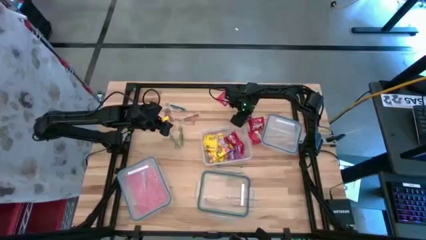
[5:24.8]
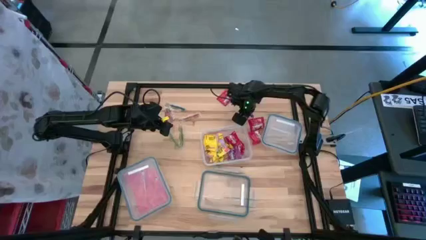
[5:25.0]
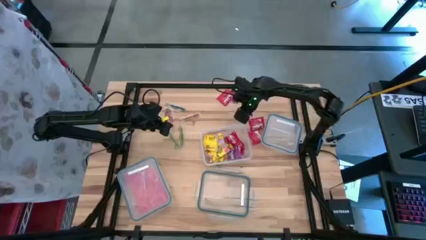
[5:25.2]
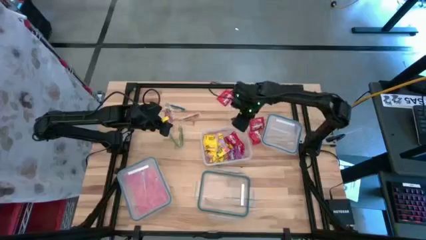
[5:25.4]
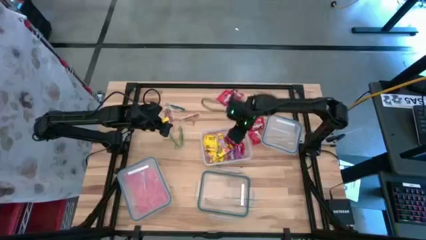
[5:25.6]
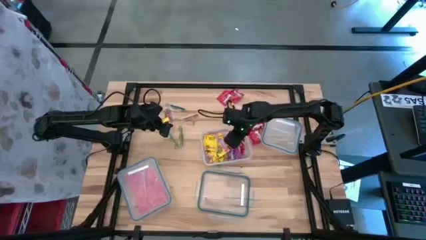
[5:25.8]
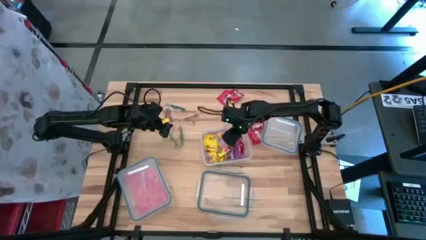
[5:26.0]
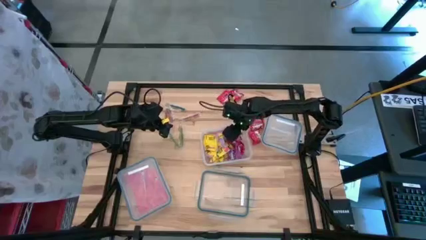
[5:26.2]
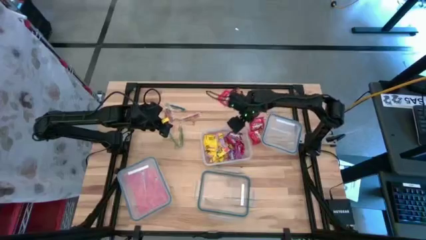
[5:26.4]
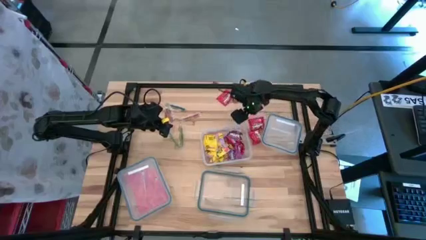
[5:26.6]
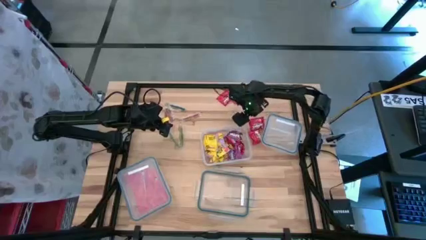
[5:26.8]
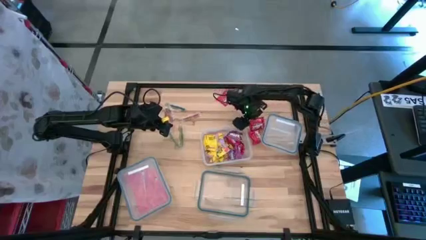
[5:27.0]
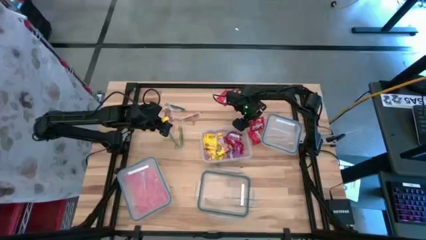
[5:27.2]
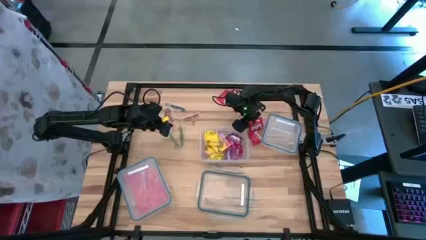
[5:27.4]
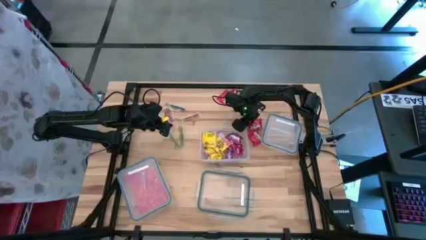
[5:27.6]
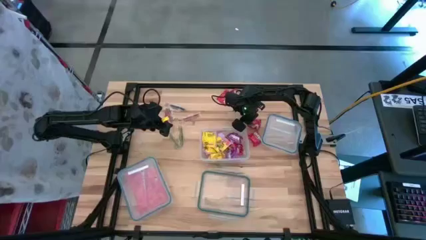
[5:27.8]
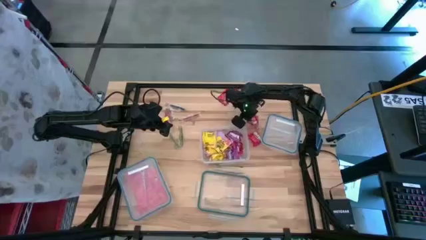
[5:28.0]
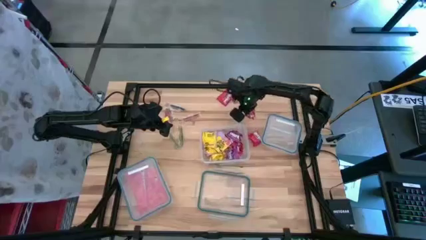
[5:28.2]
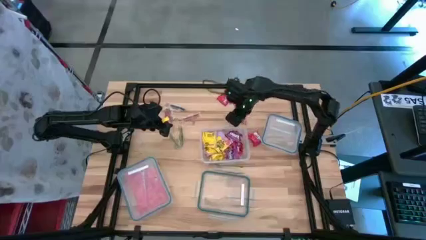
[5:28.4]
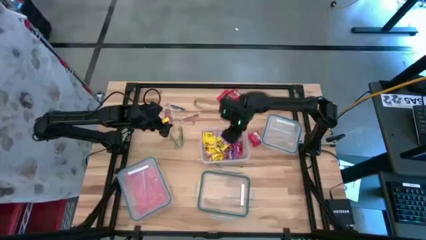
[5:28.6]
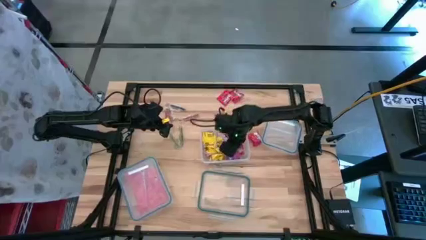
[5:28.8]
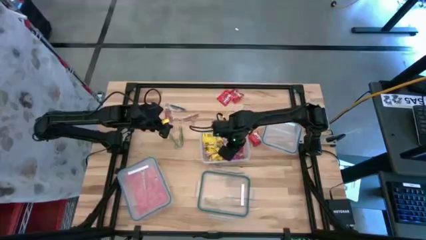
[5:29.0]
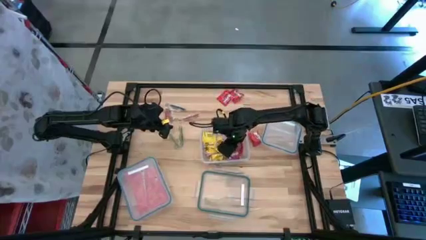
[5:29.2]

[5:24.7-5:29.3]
Task: Sort candy
Put the purple candy into the rectangular transparent bin

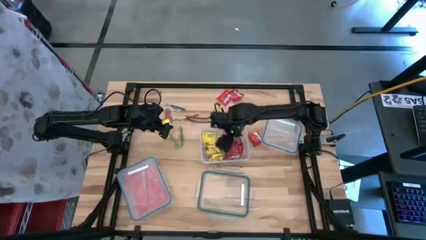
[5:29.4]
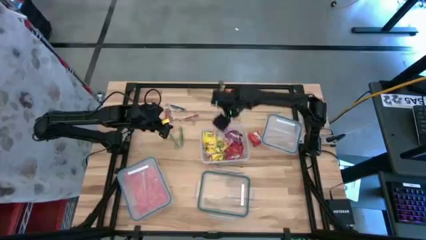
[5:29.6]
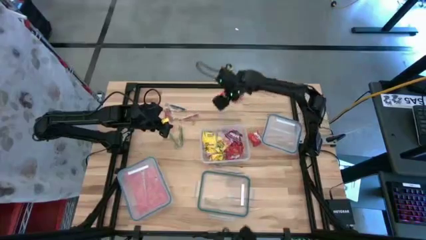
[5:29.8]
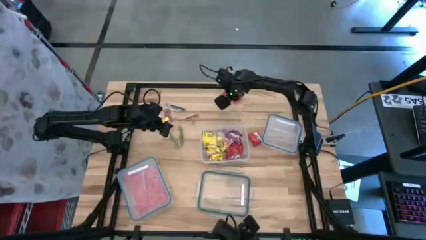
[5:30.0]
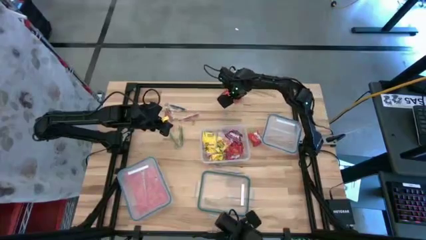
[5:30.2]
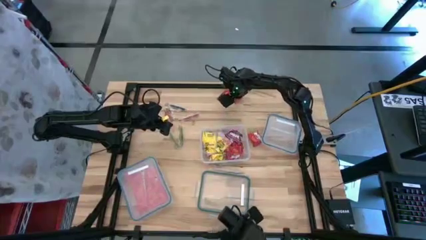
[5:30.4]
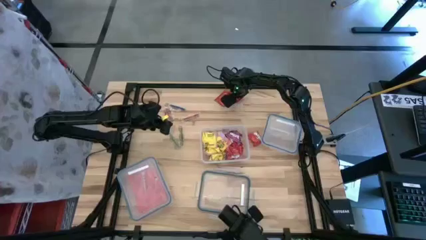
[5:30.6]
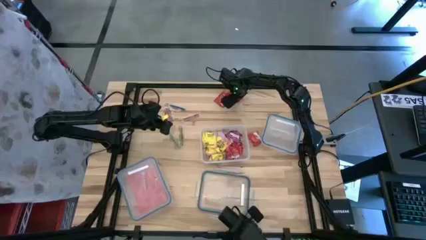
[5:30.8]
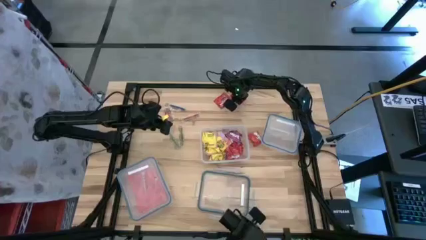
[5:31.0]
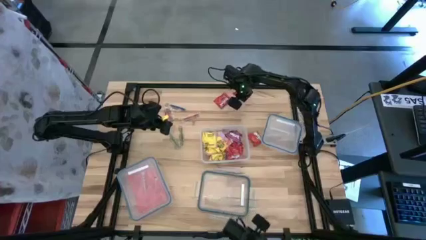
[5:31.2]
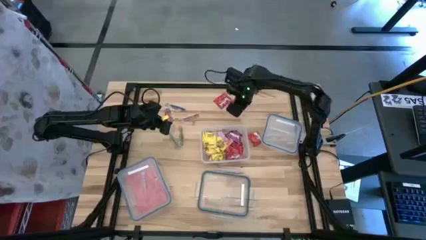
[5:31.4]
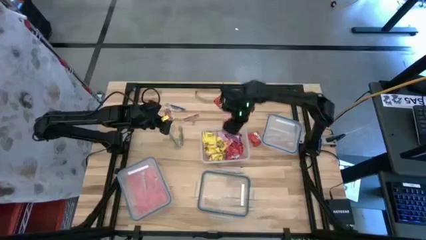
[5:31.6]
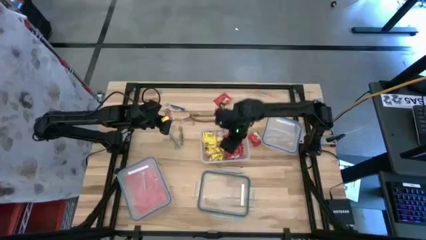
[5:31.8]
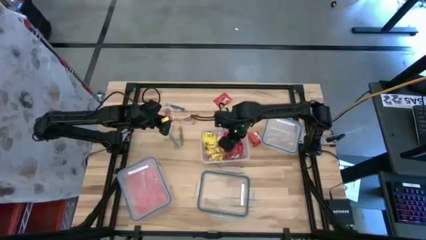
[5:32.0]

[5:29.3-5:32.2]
Put the purple candy into the rectangular transparent bin

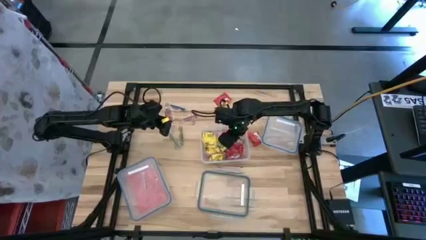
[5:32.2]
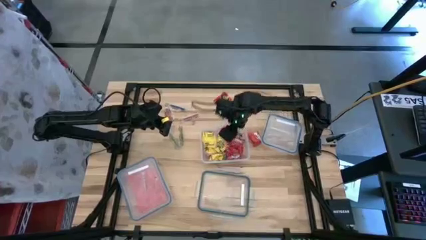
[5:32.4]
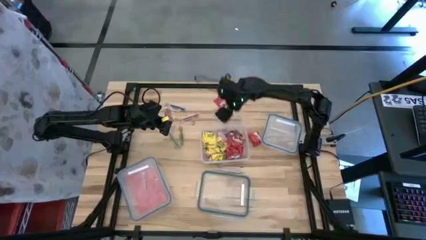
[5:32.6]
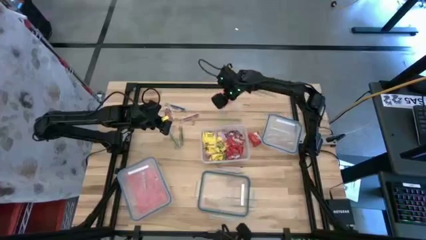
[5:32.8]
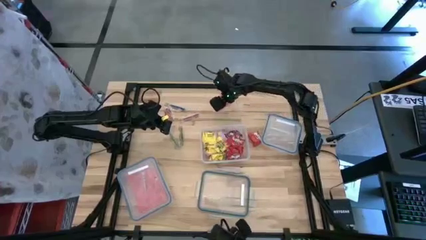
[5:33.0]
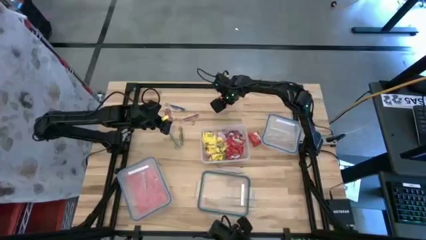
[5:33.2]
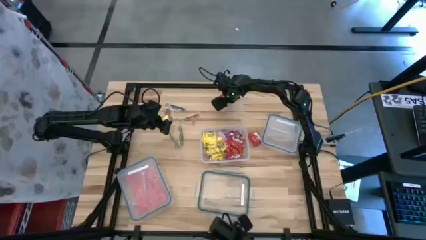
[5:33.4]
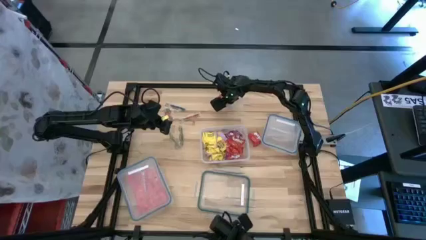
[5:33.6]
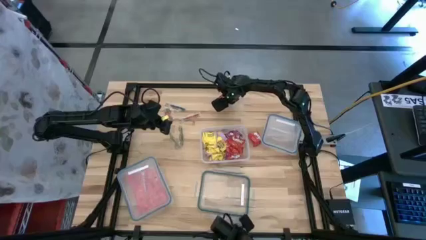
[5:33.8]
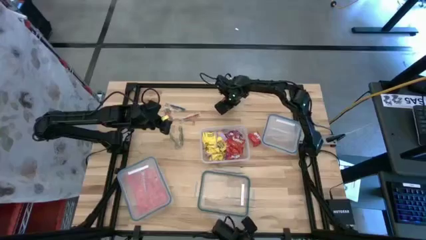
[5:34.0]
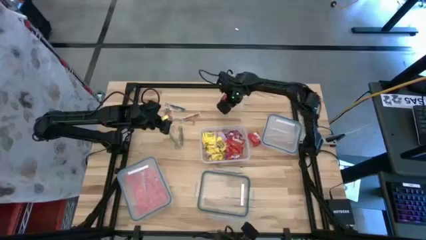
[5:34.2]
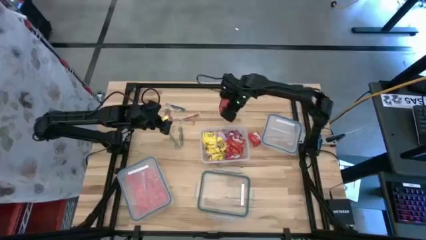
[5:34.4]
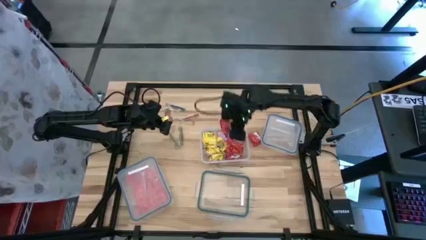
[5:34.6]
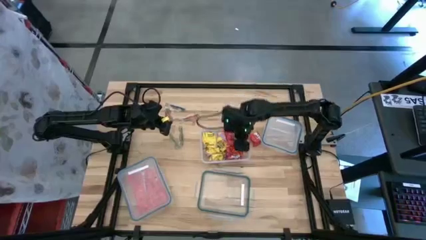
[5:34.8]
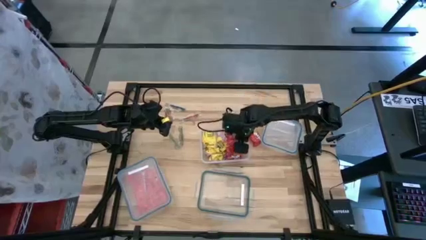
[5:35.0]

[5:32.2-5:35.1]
Put the purple candy into the rectangular transparent bin

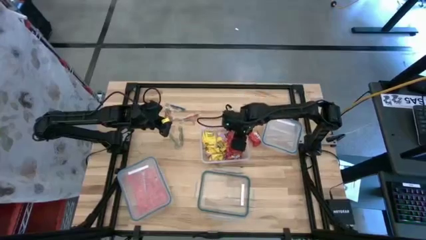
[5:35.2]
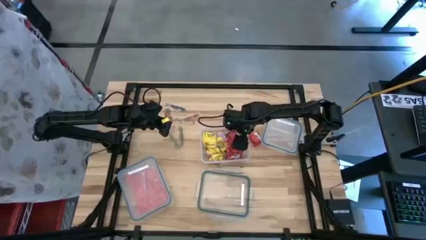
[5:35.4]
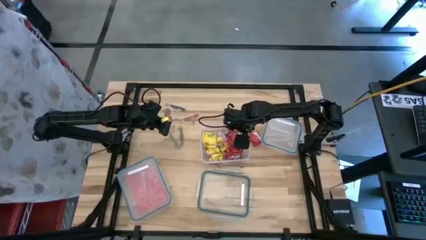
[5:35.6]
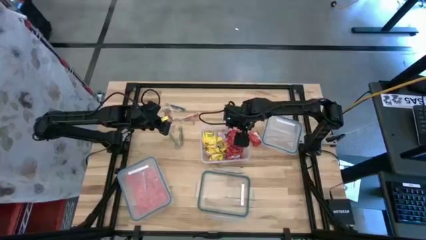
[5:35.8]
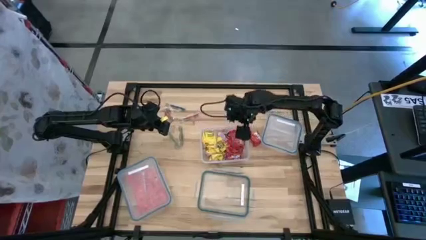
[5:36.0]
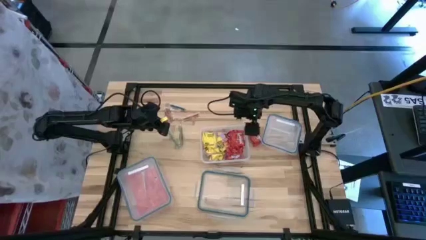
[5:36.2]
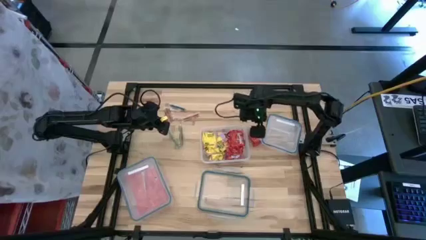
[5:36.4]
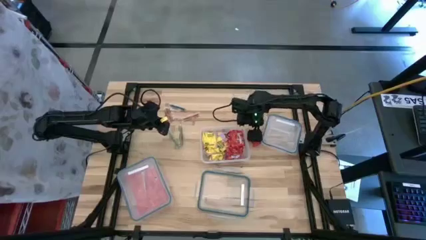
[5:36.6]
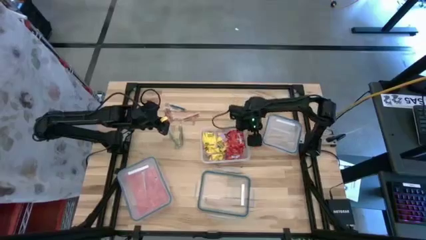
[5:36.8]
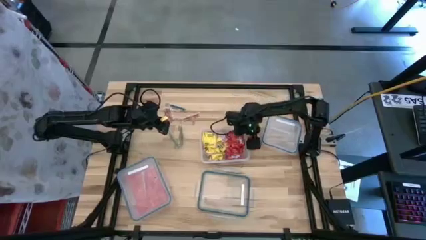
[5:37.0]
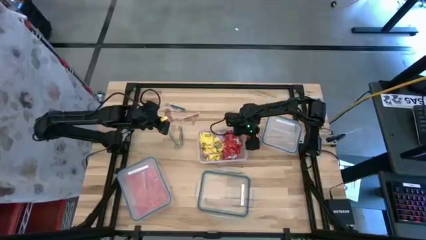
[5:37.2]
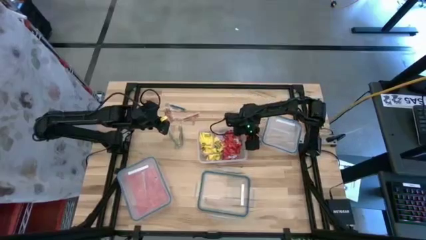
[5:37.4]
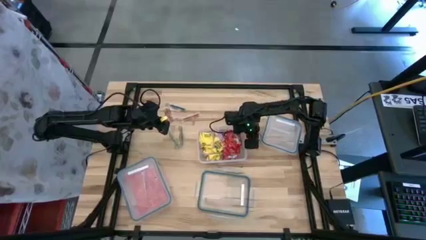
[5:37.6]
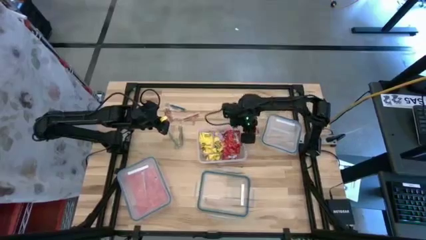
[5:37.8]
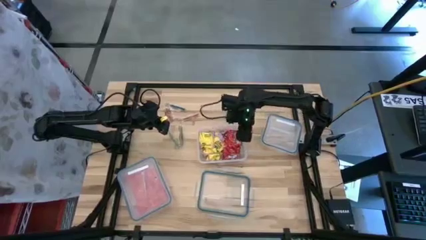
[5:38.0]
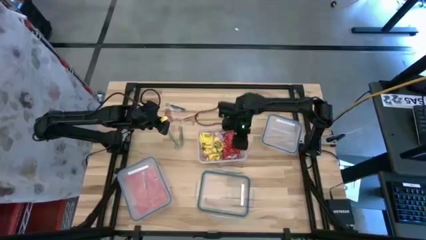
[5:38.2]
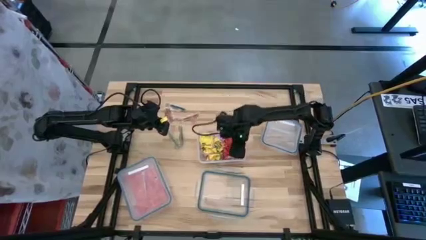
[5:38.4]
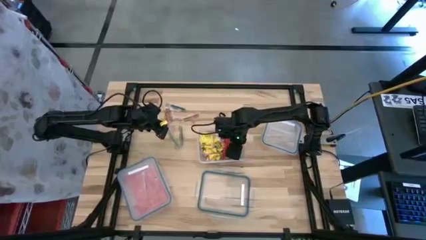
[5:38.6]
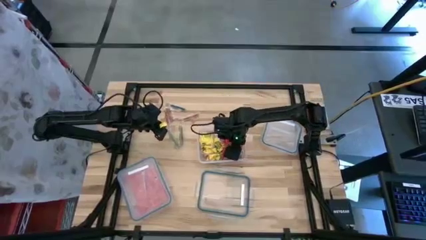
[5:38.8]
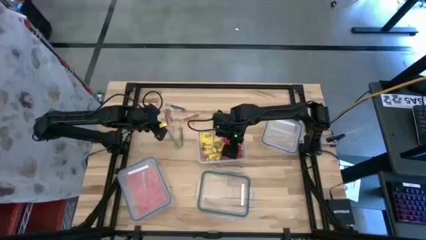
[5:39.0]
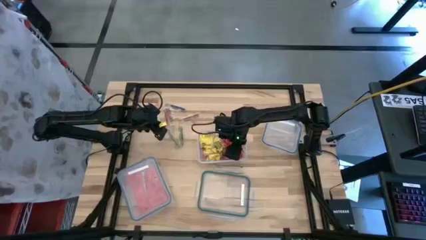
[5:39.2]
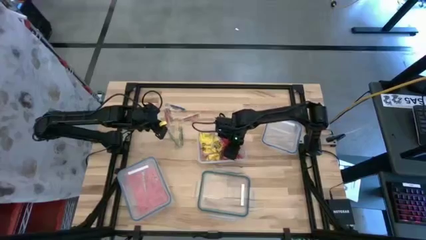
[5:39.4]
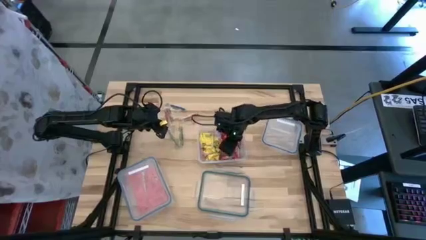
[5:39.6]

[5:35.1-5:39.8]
Put the purple candy into the rectangular transparent bin
